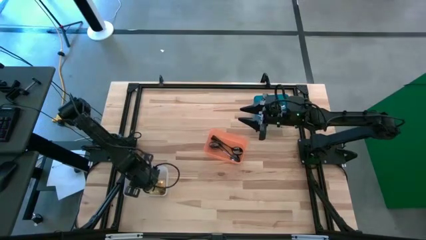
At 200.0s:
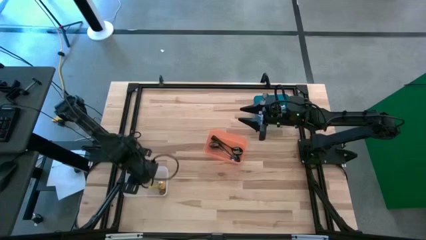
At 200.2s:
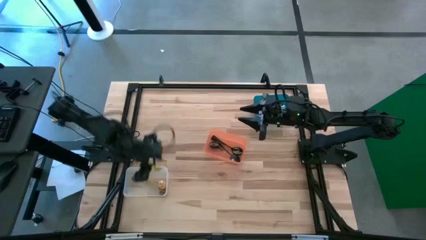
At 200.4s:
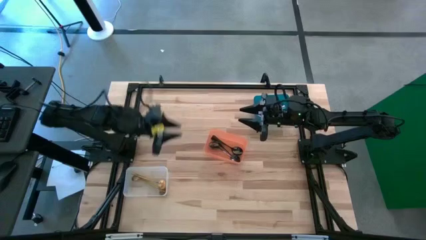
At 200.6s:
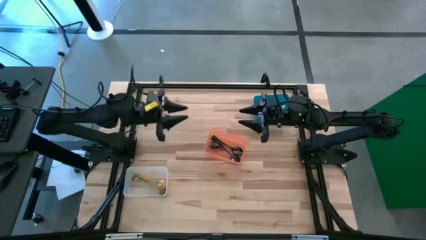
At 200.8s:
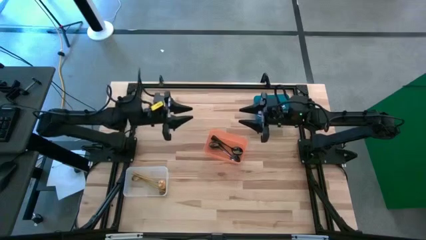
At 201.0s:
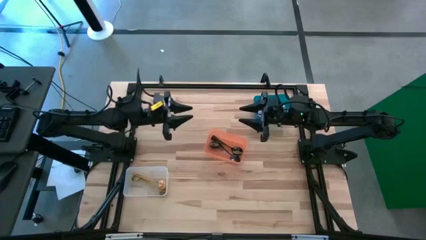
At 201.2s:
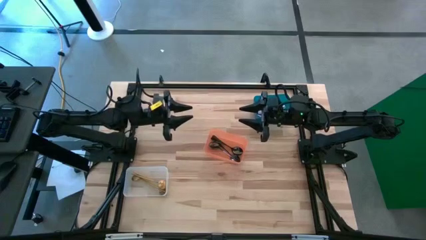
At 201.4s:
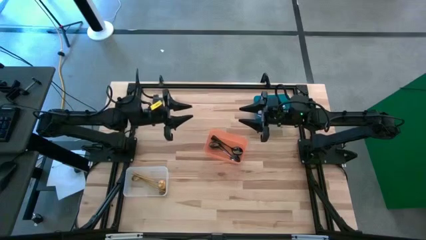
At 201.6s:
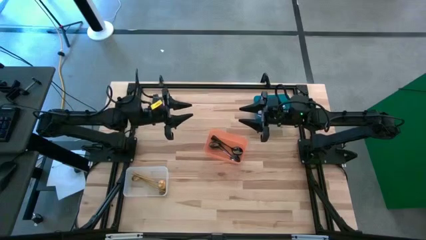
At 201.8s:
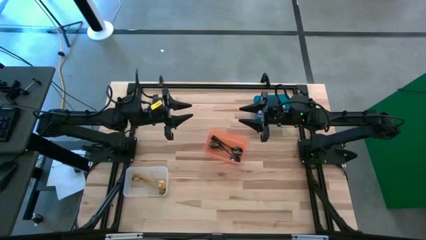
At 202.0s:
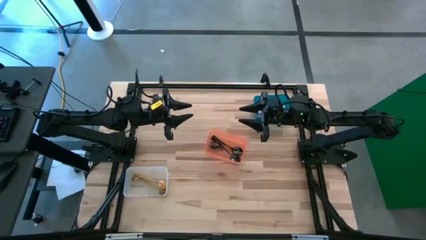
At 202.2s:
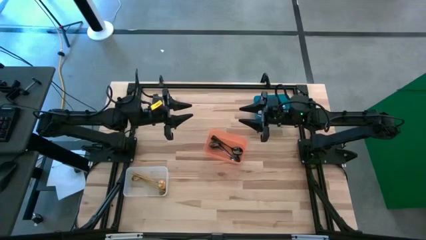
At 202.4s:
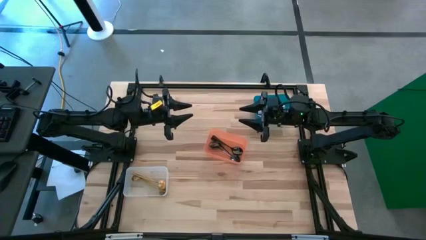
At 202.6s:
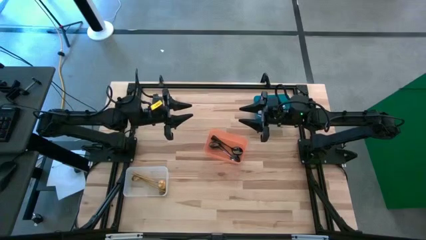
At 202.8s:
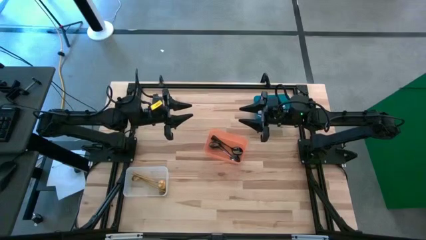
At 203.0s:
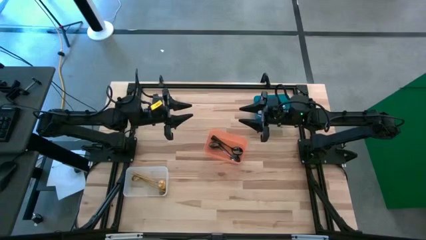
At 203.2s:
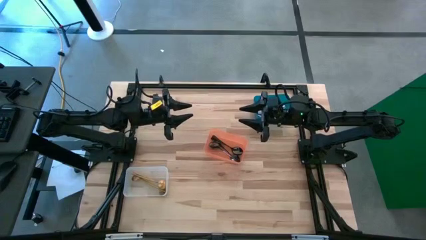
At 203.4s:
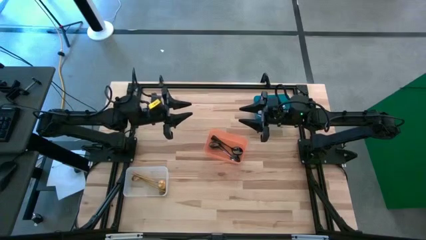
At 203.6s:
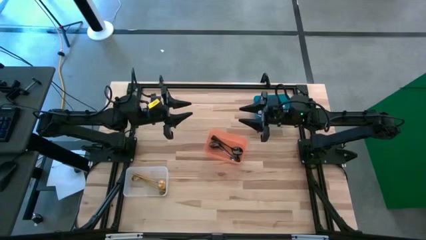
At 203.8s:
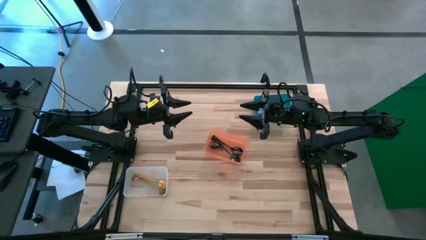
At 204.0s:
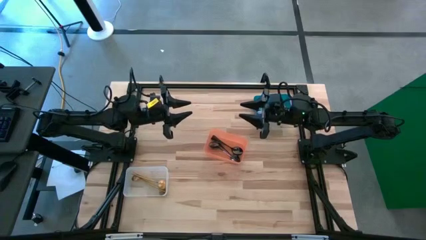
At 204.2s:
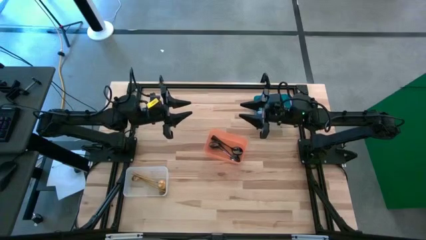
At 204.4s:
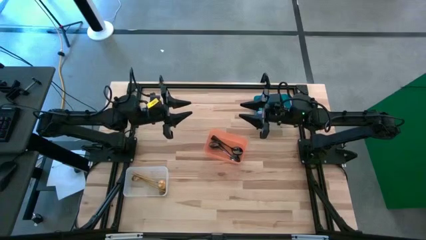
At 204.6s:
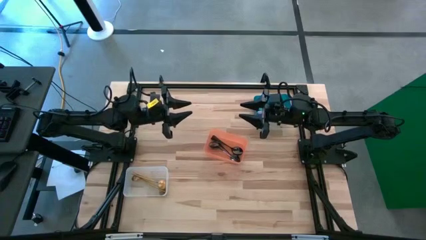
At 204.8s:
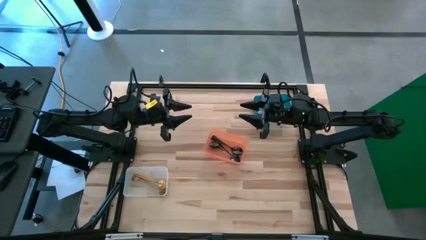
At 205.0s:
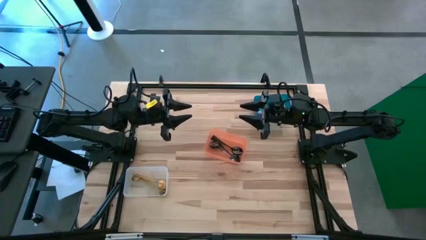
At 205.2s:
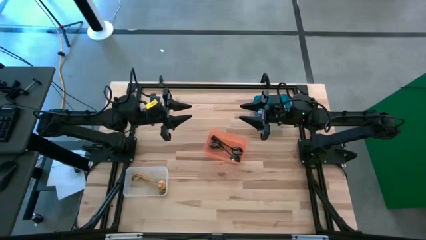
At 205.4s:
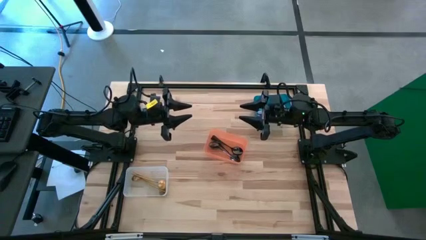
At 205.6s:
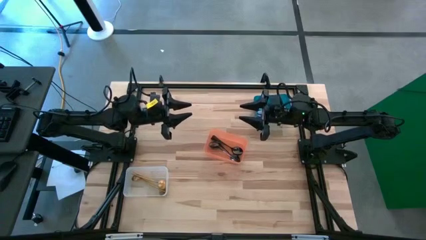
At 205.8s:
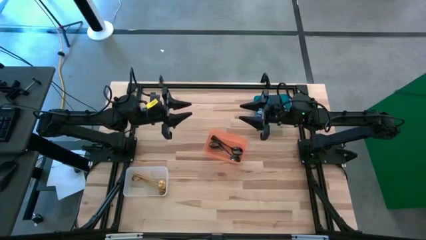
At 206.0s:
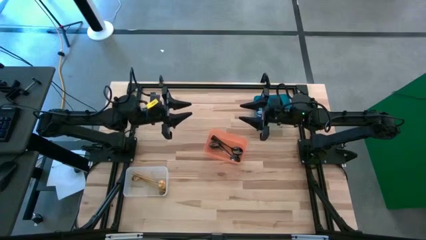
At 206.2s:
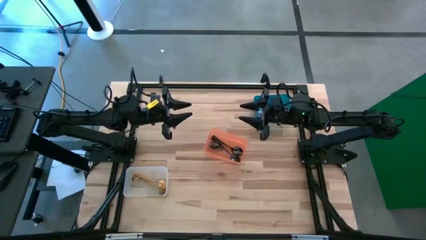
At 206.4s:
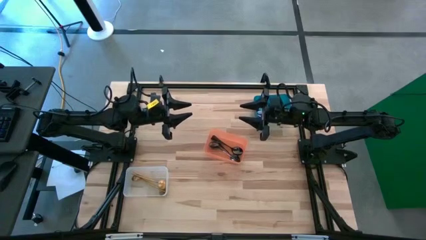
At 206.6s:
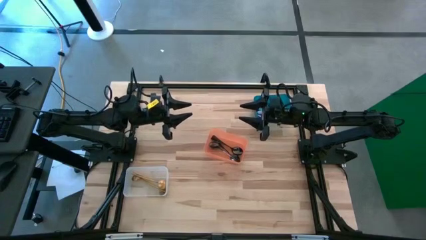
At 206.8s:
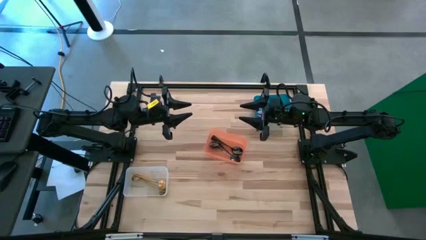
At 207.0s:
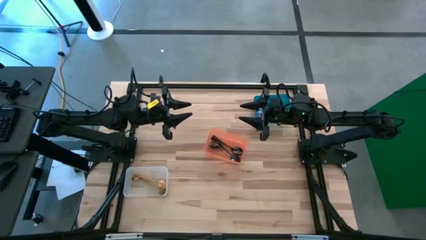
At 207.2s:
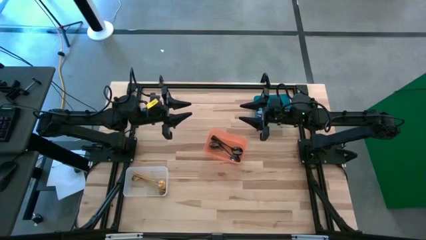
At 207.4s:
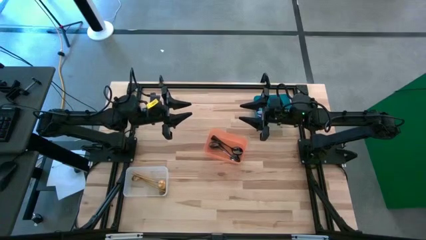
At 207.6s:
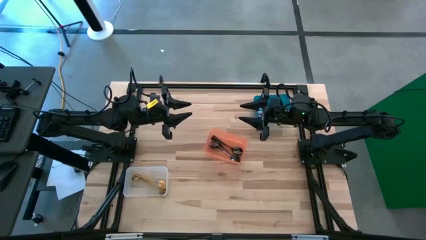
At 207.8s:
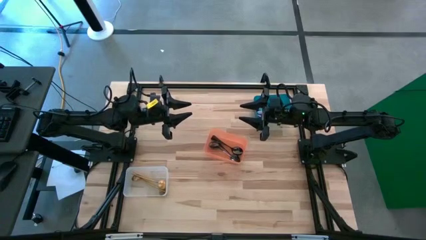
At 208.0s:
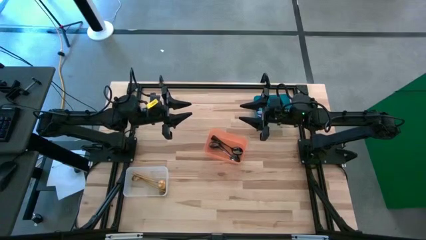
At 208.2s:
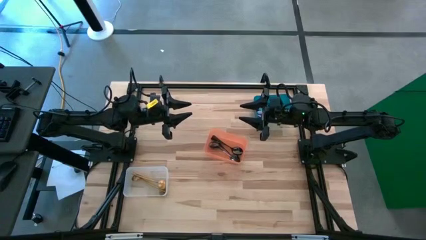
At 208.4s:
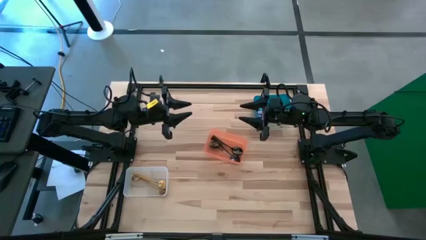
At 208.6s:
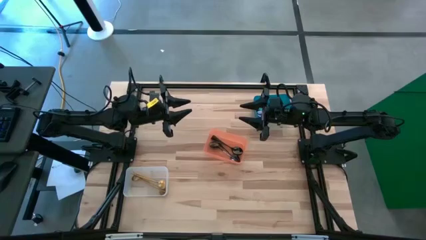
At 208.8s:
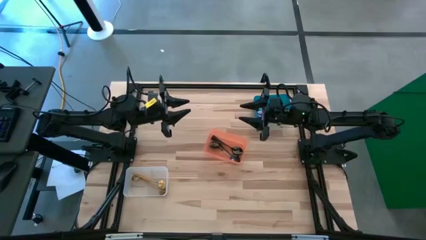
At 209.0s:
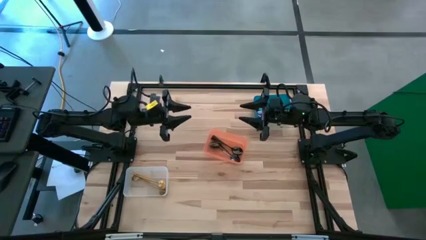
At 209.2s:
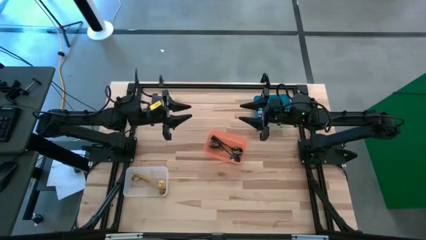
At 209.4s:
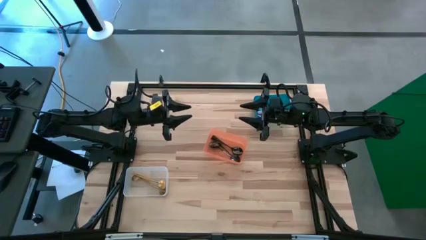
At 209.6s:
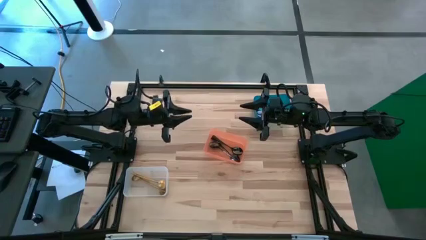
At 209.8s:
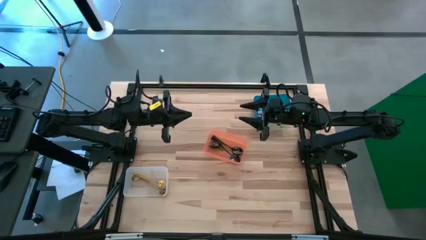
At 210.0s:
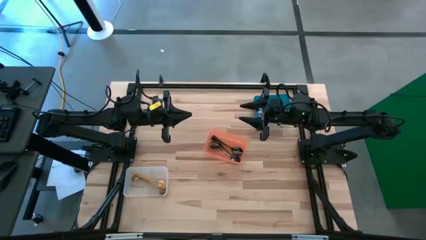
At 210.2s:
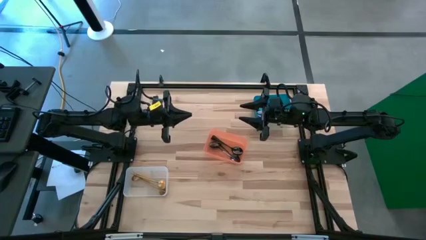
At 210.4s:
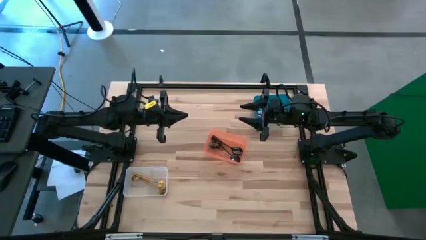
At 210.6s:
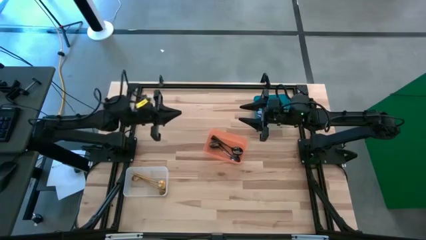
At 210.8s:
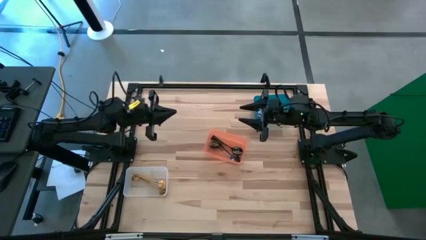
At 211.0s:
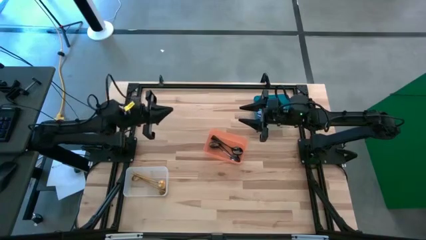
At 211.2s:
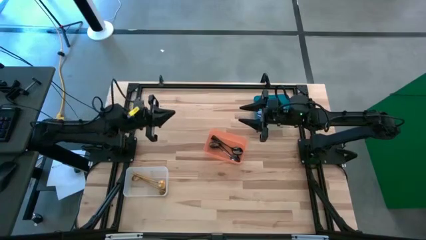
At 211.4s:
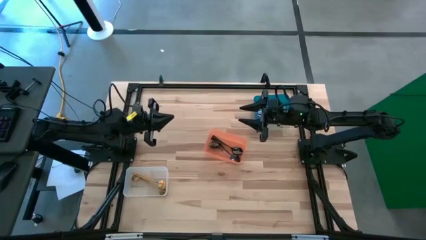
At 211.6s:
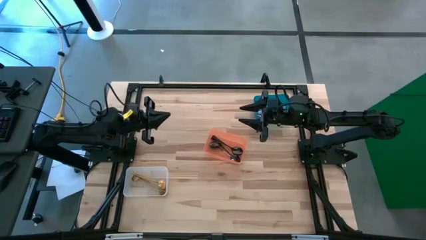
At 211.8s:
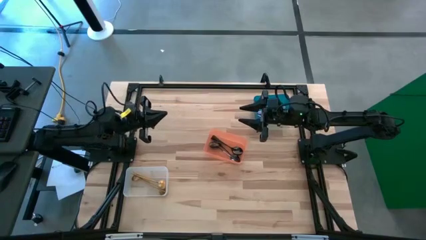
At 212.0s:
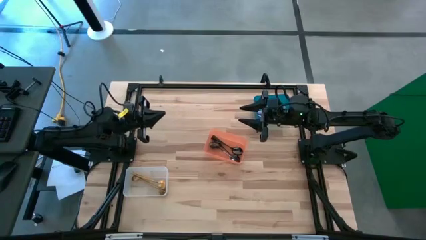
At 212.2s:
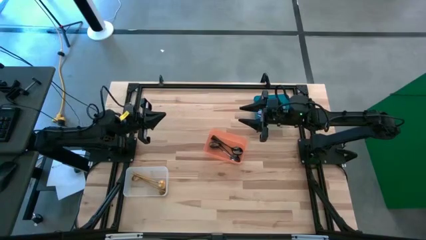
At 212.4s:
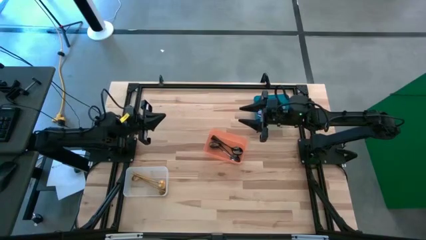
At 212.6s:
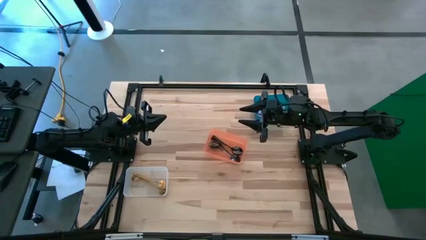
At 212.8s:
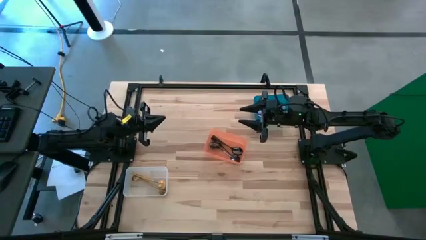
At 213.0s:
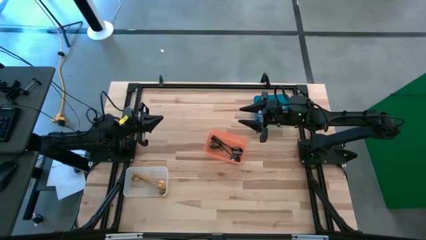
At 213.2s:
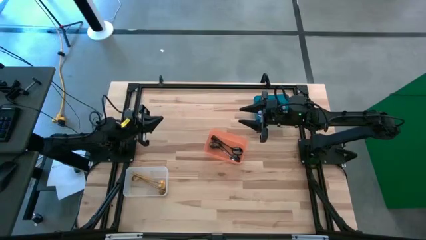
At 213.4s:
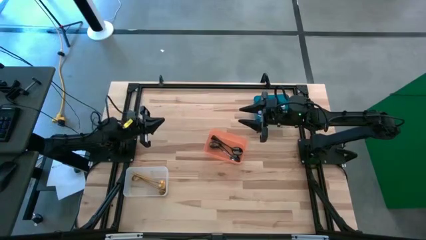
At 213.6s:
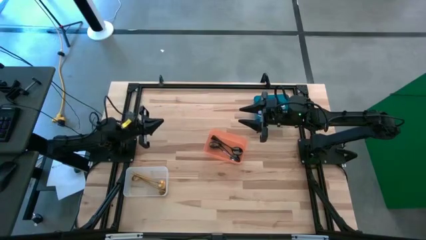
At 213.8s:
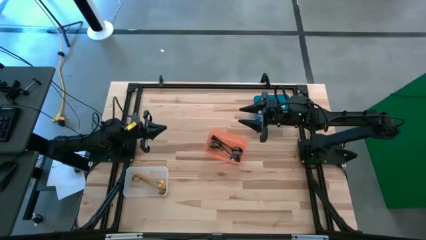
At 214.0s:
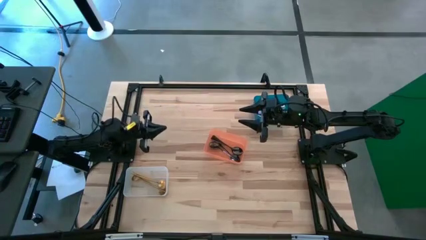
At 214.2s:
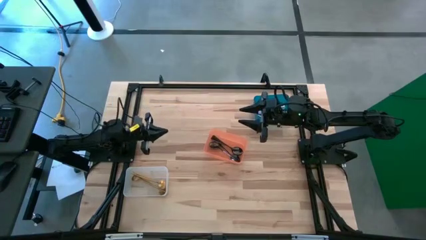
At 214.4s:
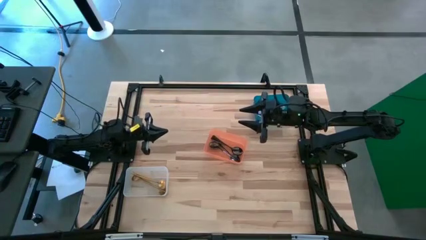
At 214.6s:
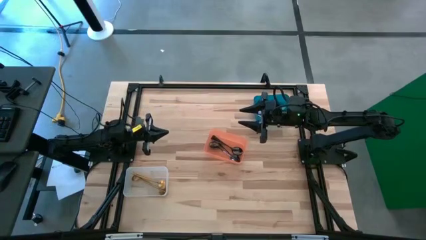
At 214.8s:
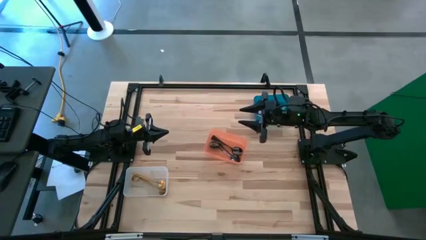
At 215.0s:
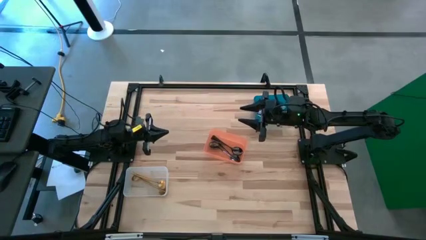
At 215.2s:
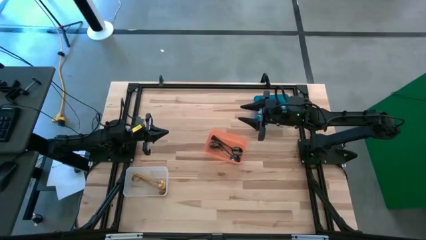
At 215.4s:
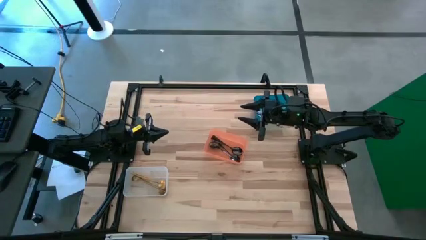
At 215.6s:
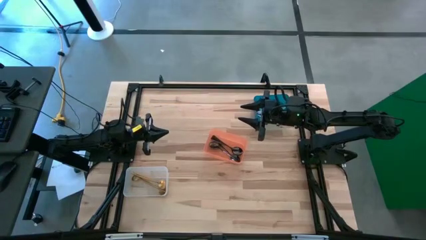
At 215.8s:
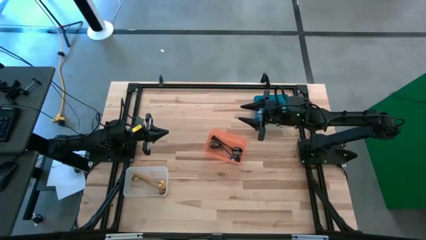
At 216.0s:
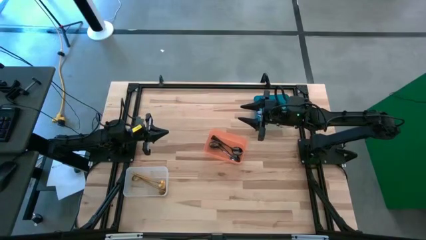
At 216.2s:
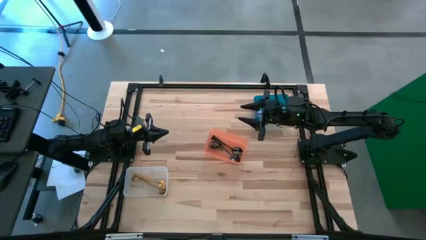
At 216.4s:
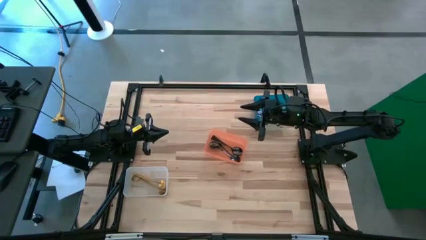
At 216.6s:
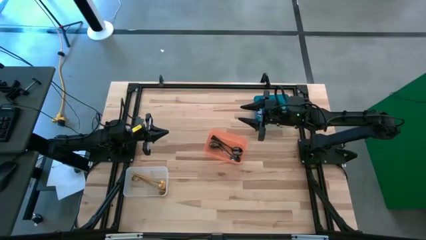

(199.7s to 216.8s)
Task: Sort silverware by color (type)
Return to Home Position
